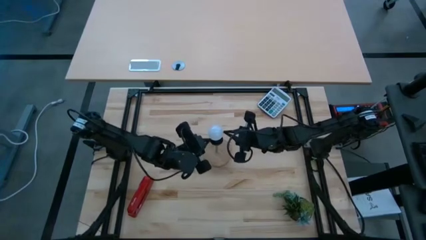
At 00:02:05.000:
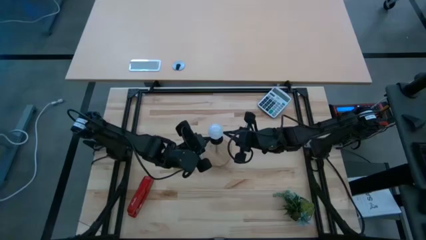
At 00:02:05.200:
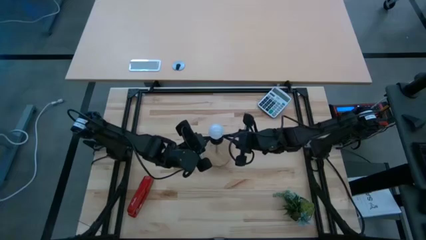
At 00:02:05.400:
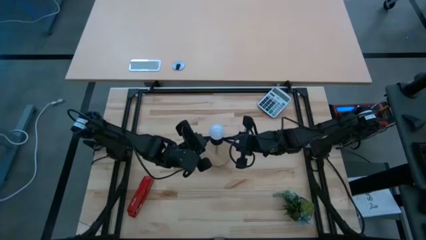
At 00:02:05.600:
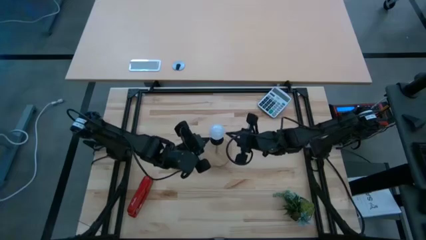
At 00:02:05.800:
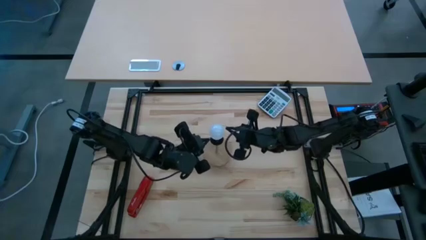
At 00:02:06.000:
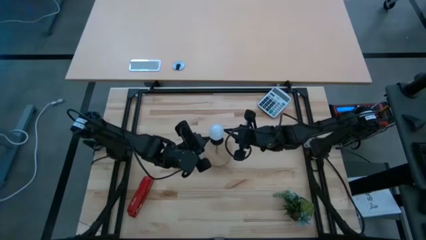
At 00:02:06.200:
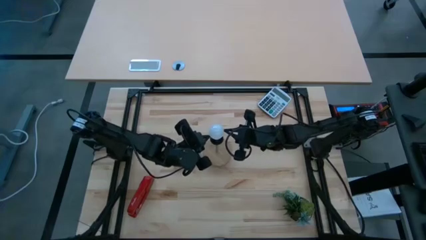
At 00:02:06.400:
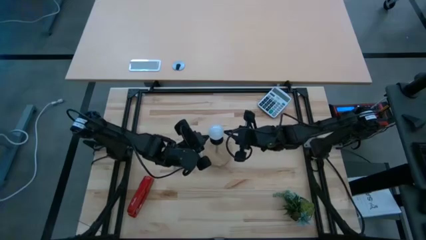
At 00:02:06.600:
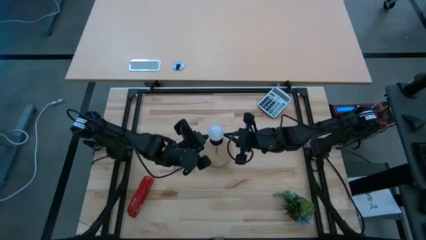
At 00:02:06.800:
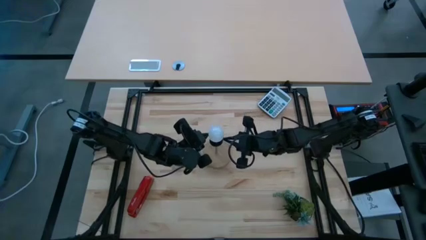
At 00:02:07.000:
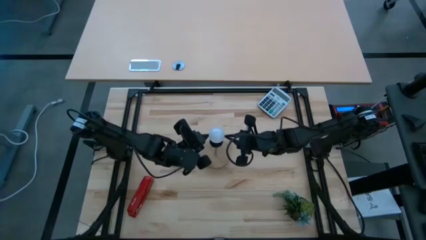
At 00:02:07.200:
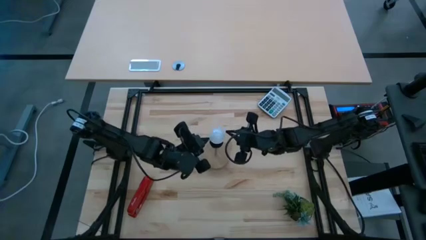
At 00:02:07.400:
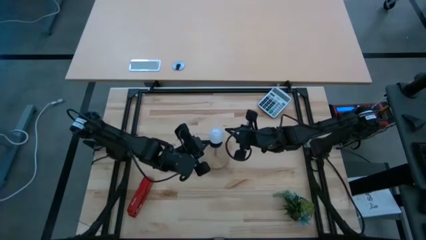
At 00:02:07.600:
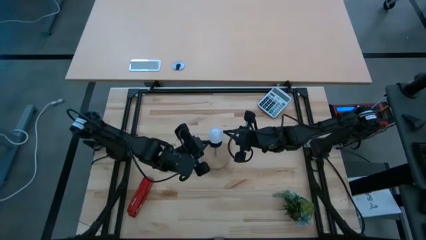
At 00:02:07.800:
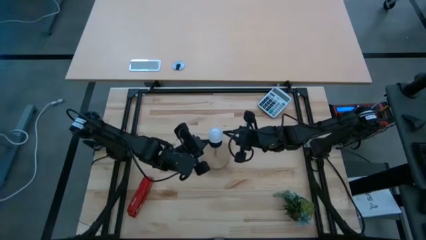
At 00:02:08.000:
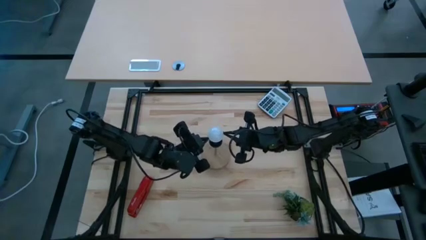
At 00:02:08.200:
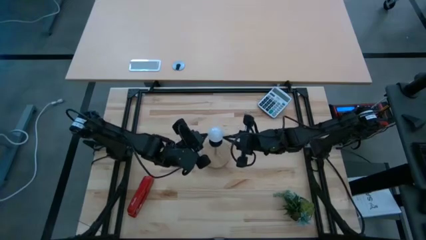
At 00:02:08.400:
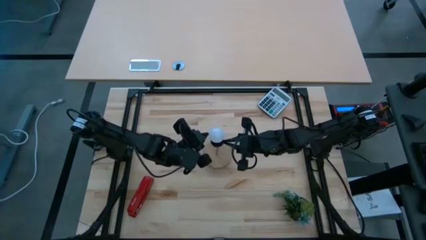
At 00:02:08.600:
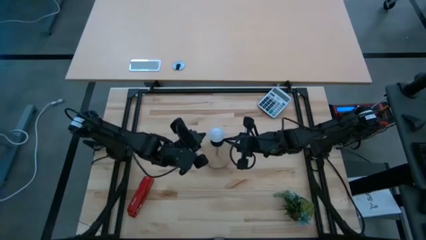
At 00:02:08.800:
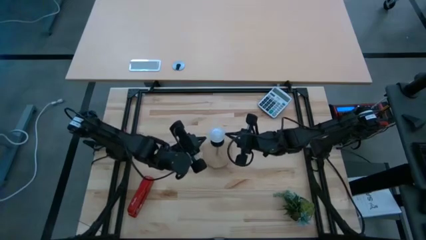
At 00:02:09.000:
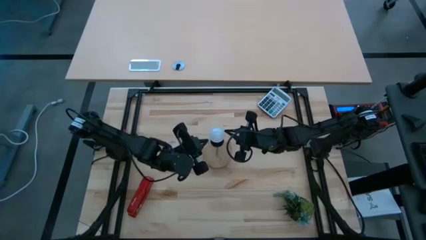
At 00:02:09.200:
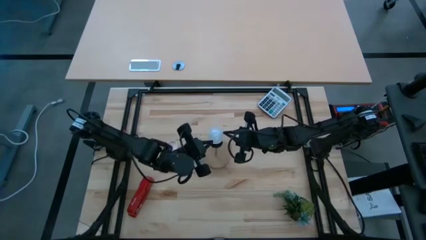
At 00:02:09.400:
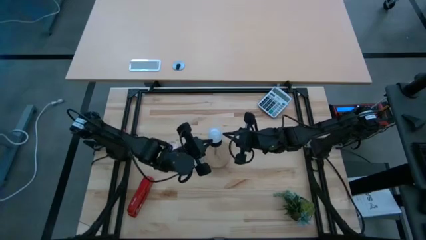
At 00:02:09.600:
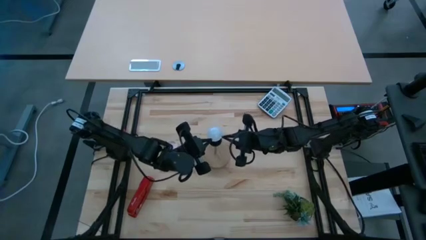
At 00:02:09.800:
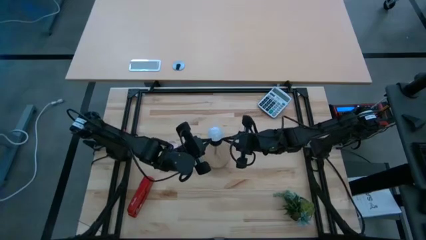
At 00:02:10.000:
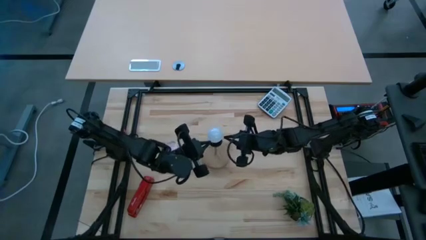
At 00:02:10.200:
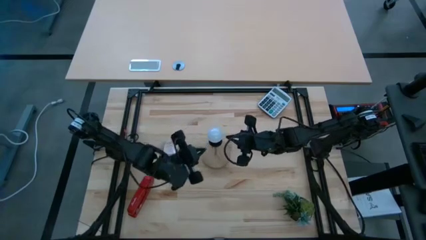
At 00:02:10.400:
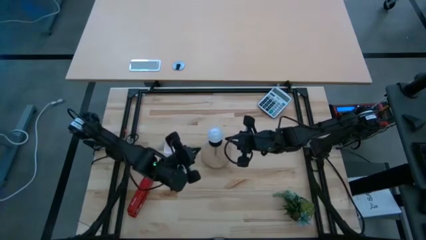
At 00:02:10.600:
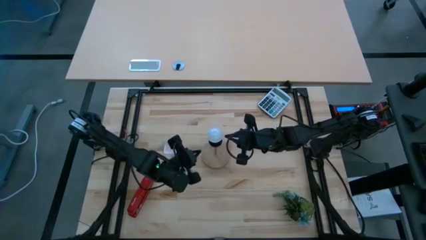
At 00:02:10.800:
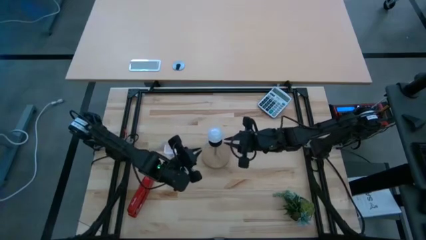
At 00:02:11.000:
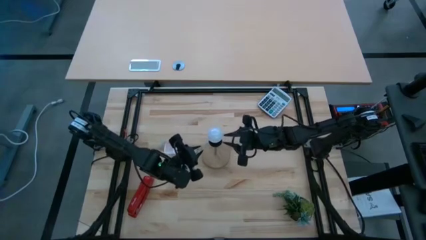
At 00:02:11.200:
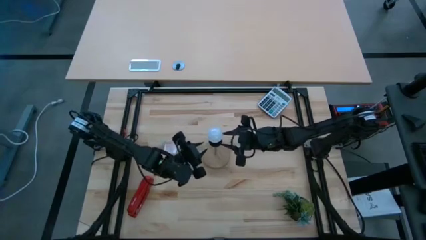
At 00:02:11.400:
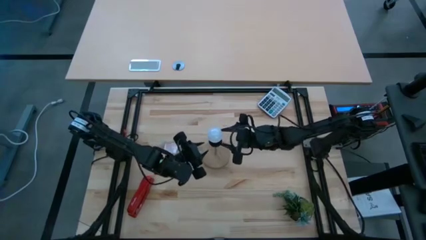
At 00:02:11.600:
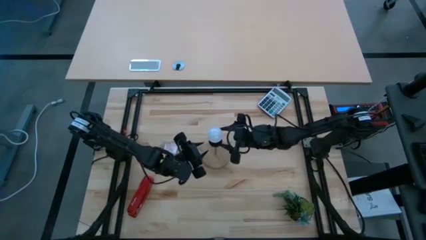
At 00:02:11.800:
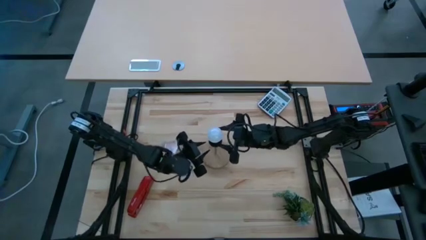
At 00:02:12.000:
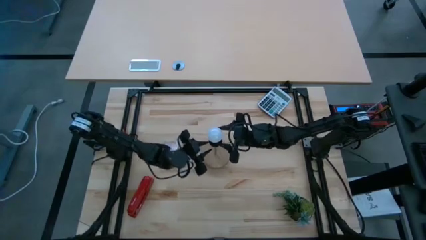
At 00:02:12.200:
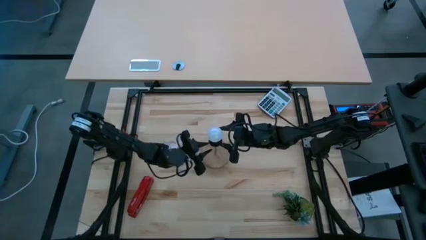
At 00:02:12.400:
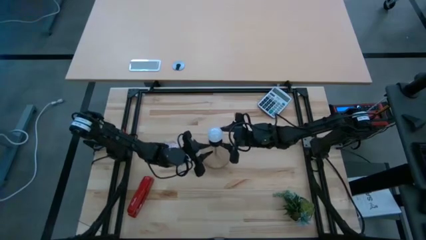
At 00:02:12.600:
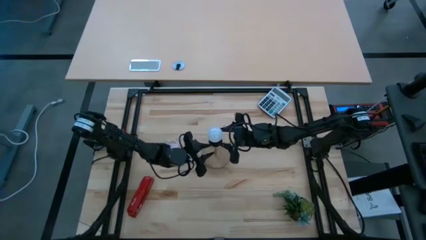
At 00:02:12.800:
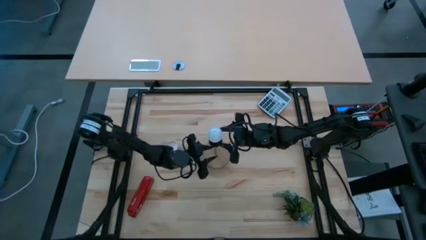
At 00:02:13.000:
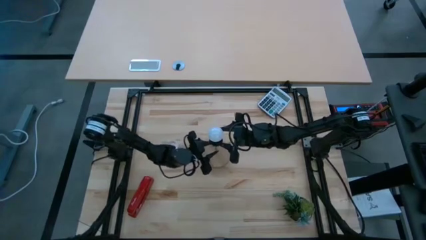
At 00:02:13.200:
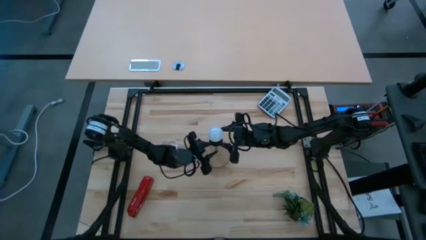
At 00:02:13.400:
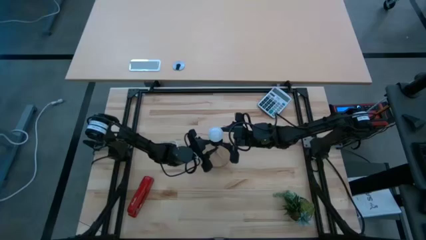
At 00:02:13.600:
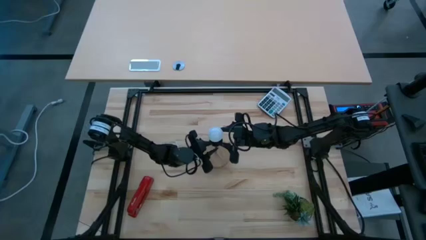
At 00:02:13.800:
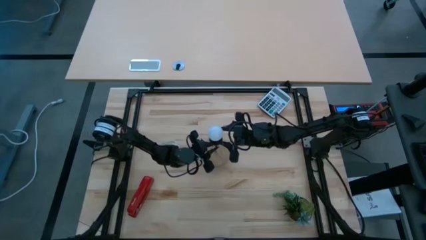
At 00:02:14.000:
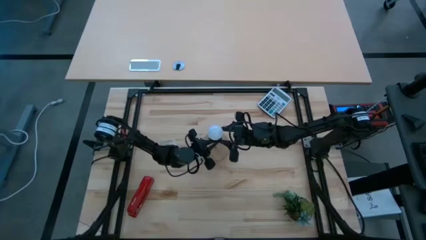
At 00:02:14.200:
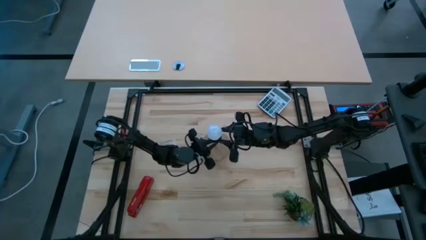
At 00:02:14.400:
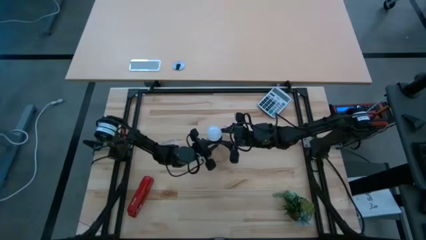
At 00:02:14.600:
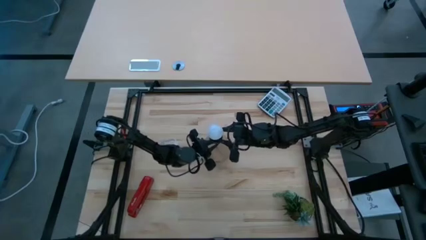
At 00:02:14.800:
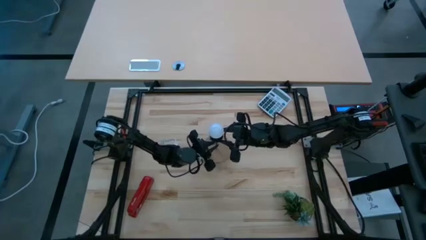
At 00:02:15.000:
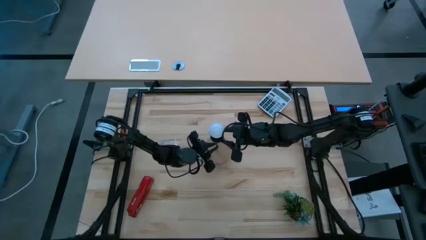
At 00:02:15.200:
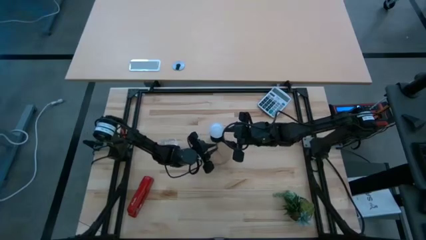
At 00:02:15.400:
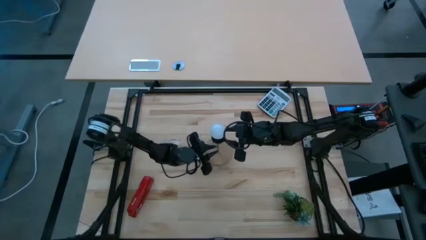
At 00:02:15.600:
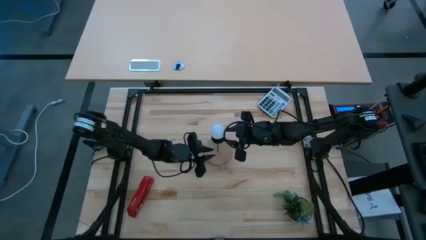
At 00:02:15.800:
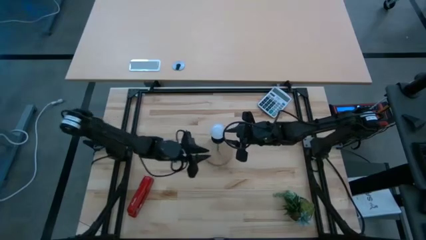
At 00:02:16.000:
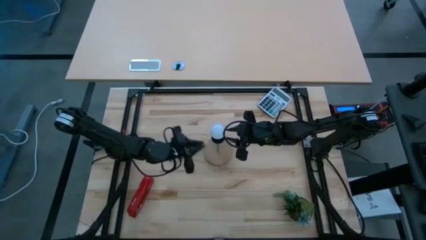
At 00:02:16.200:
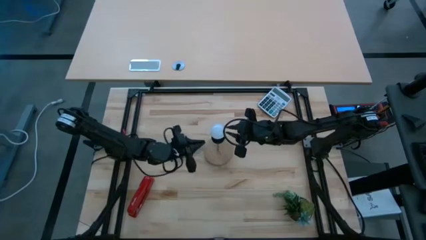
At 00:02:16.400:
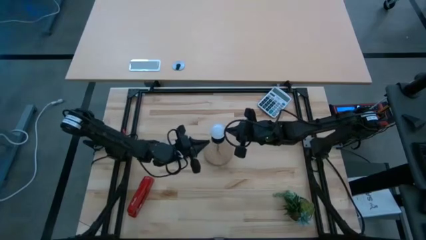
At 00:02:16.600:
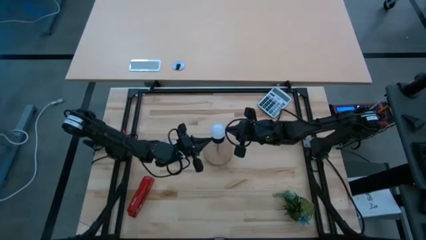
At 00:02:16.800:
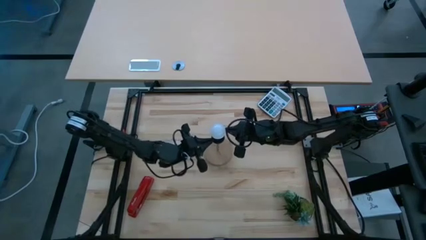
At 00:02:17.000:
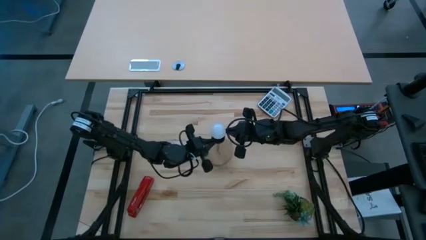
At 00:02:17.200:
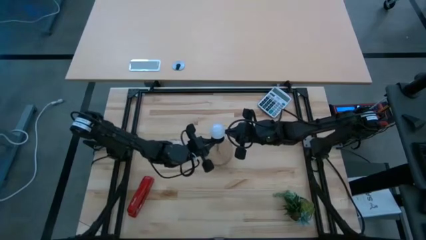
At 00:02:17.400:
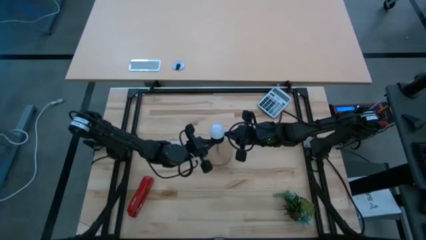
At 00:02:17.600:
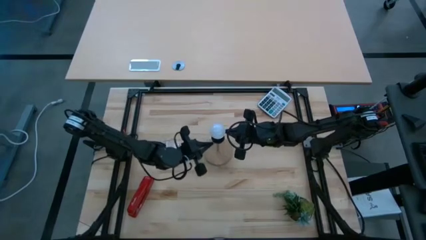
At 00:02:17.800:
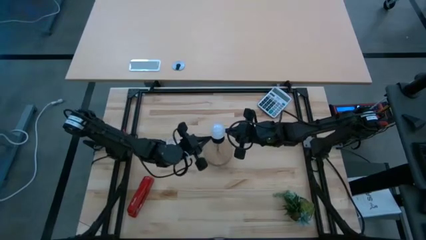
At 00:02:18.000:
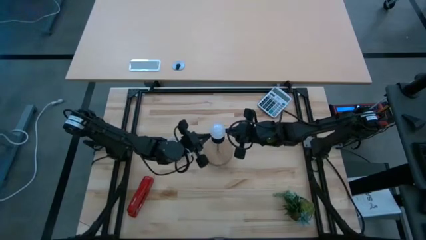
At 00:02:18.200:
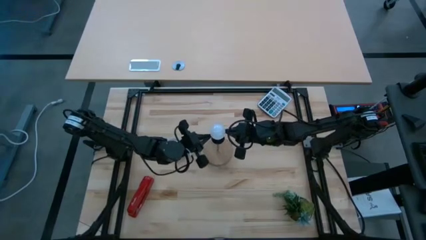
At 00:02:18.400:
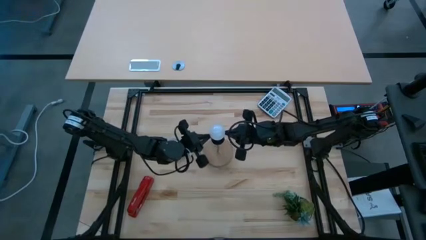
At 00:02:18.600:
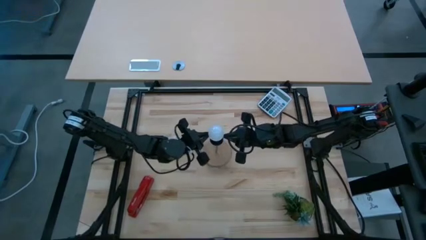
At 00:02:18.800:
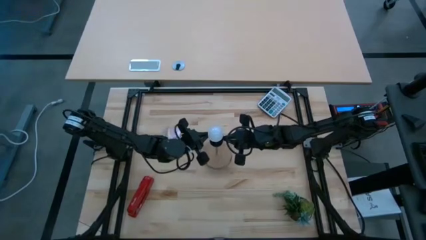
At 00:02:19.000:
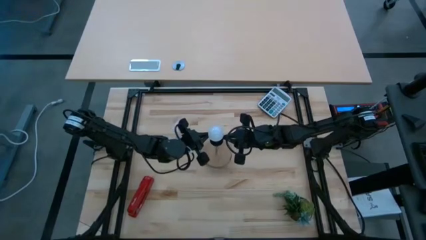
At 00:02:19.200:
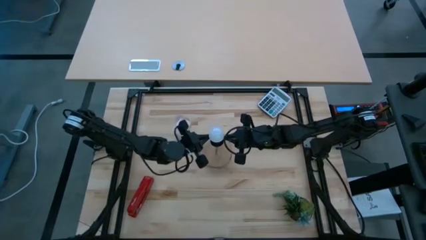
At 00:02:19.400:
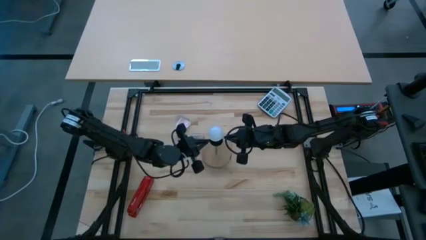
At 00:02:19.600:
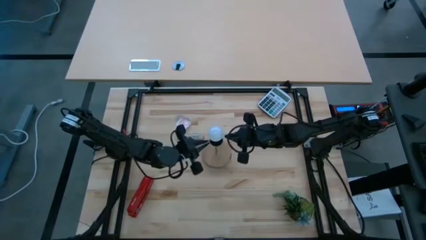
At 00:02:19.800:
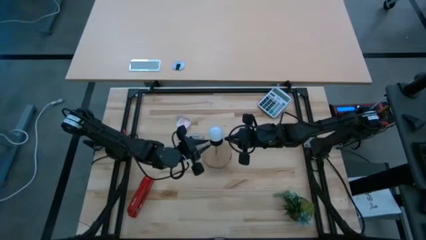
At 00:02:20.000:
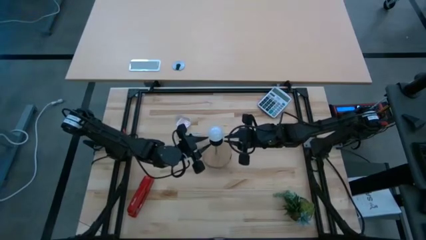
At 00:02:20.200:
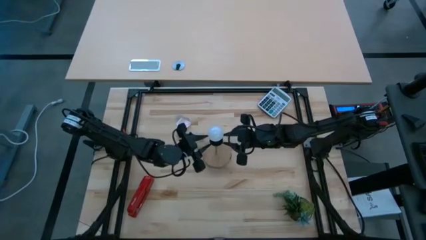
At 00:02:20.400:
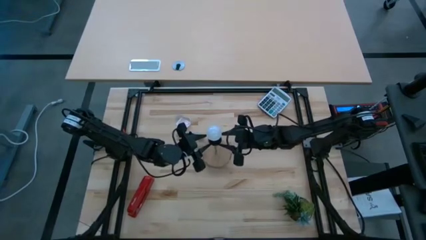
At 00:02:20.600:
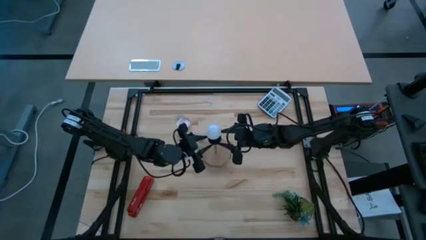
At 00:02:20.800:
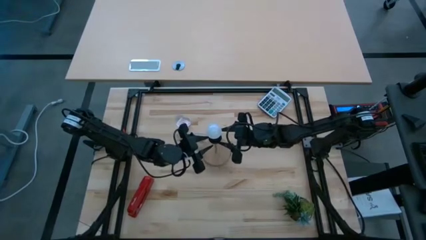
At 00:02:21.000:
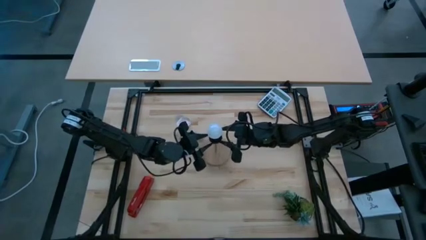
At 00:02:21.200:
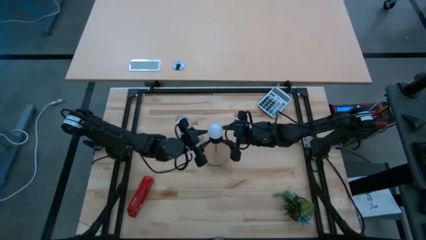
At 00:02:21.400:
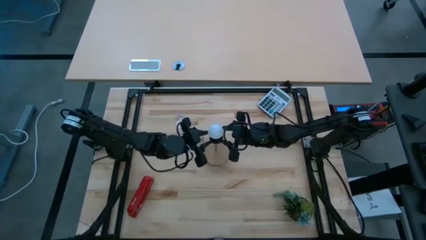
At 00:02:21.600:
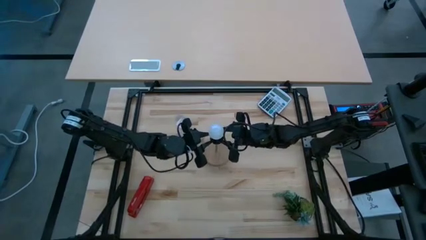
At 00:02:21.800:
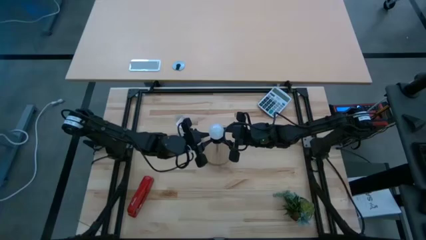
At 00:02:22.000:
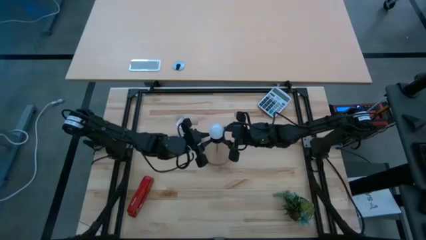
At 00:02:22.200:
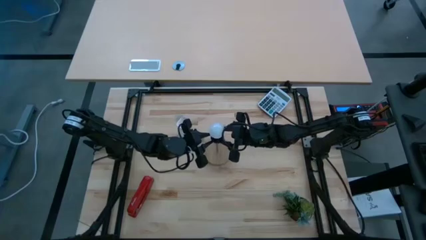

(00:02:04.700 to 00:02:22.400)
Task: Screw lightbulb
Insert the lightbulb into the brown lamp
